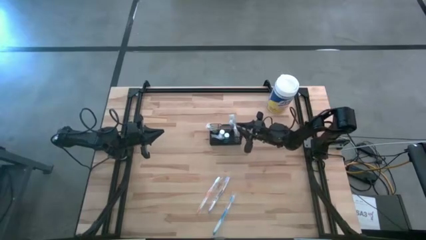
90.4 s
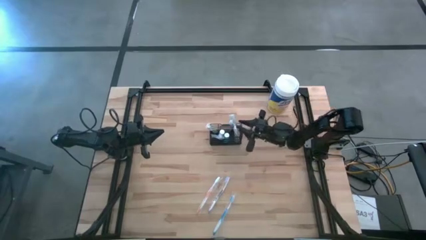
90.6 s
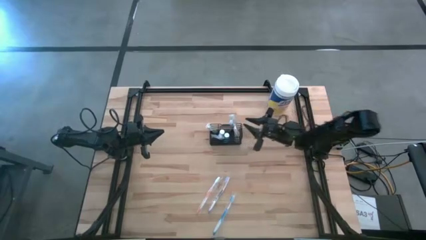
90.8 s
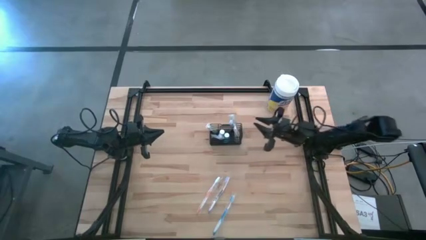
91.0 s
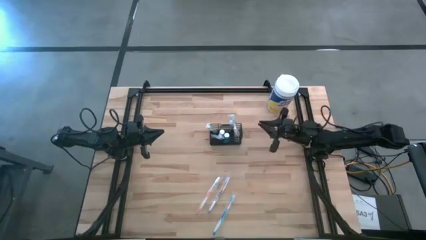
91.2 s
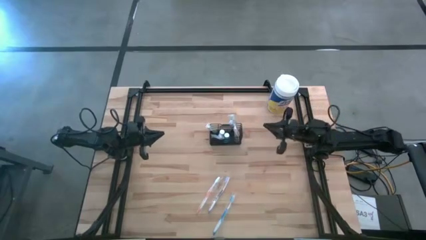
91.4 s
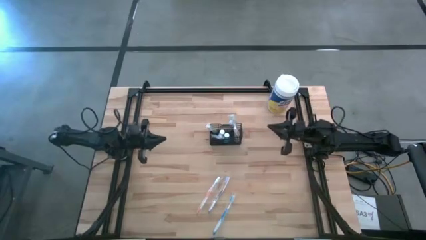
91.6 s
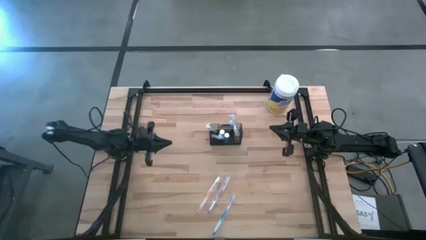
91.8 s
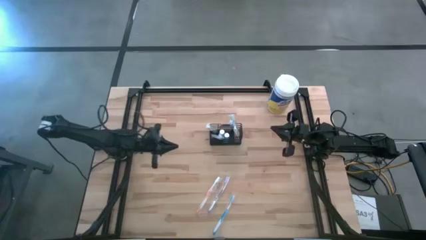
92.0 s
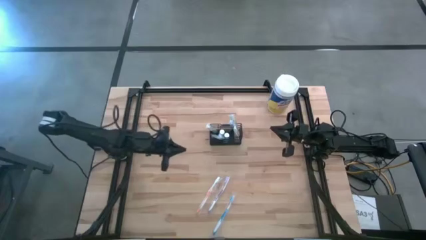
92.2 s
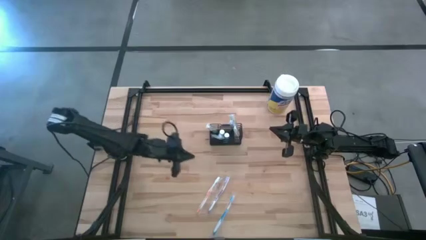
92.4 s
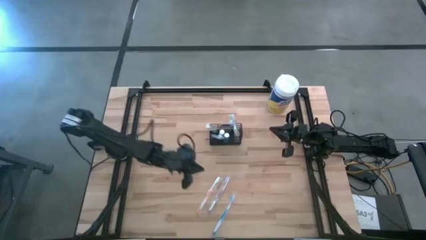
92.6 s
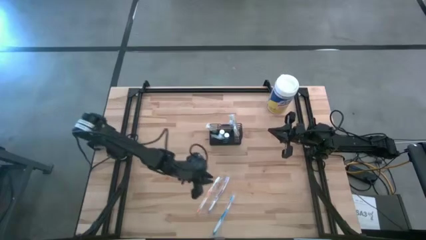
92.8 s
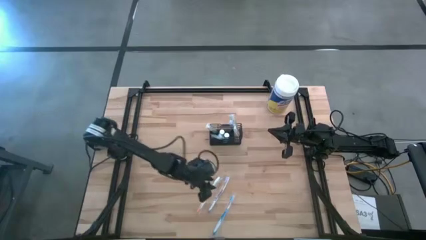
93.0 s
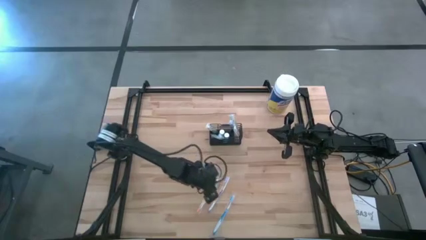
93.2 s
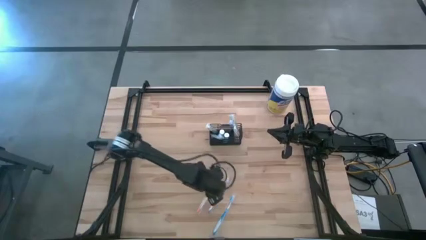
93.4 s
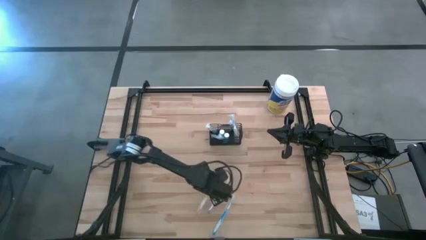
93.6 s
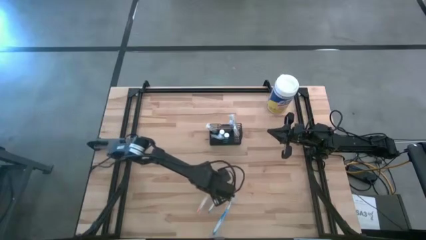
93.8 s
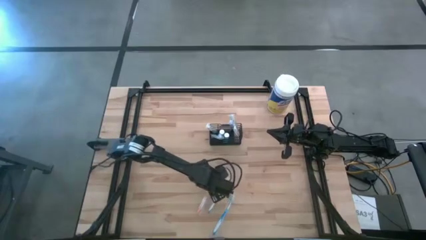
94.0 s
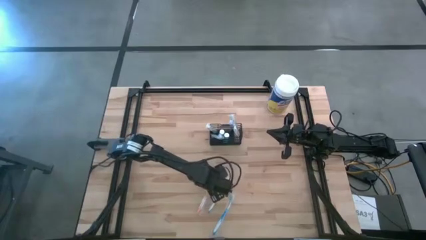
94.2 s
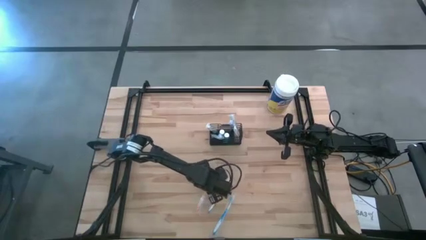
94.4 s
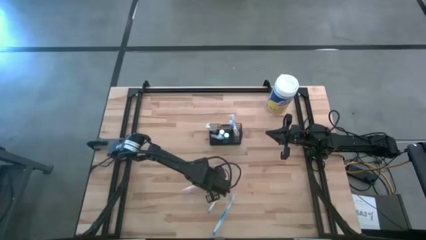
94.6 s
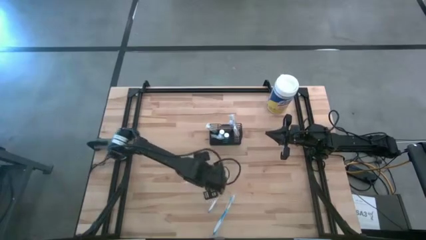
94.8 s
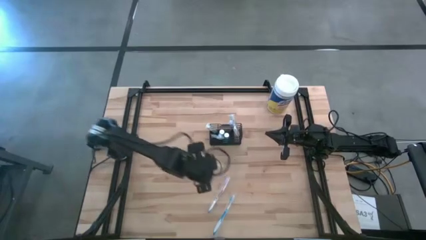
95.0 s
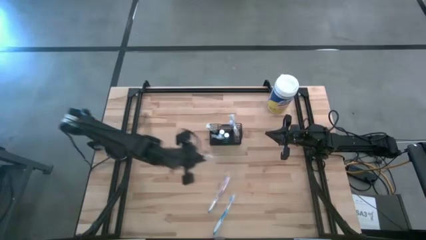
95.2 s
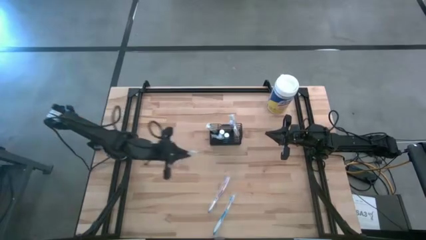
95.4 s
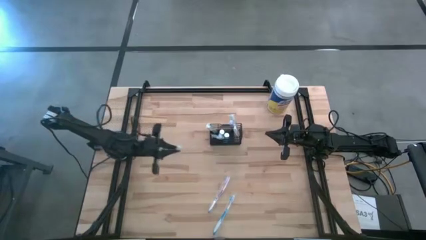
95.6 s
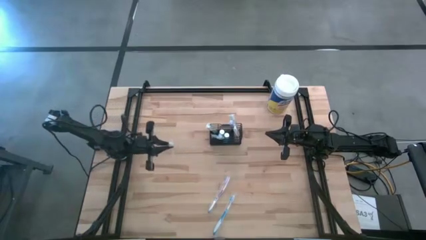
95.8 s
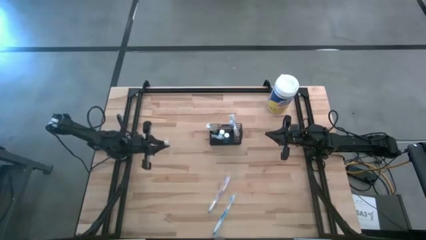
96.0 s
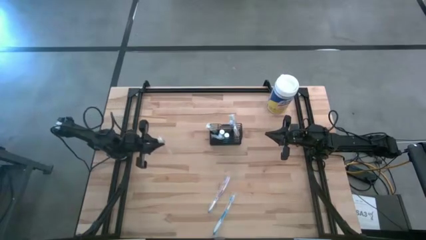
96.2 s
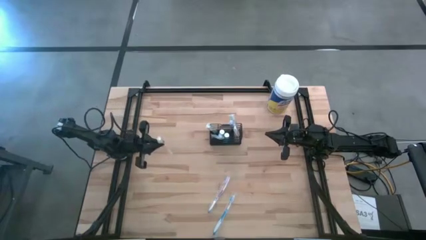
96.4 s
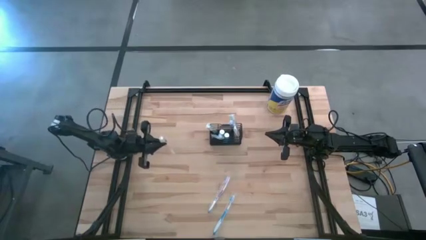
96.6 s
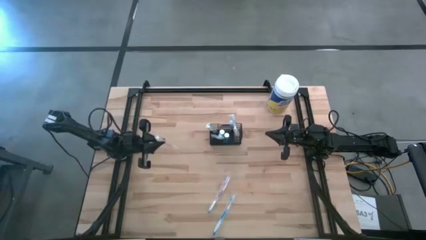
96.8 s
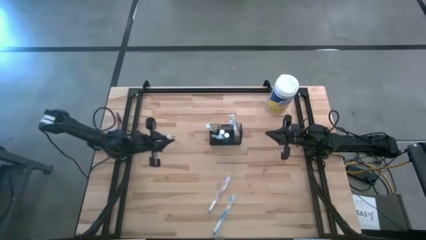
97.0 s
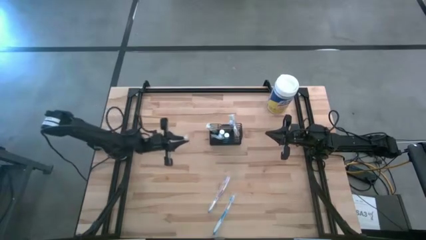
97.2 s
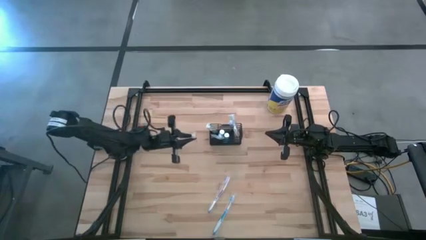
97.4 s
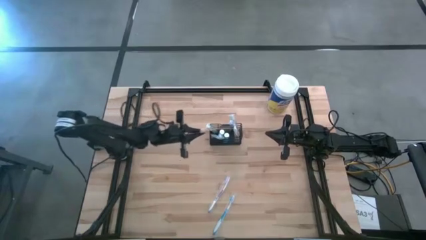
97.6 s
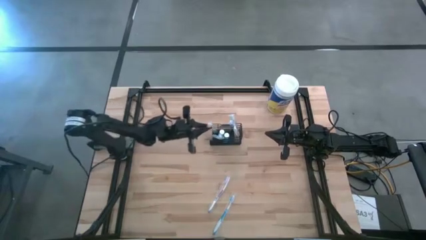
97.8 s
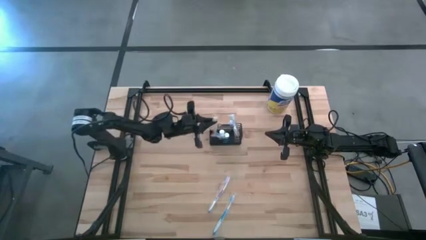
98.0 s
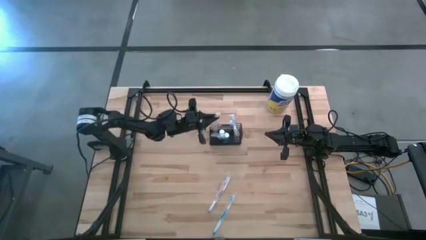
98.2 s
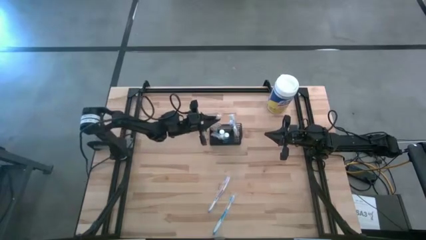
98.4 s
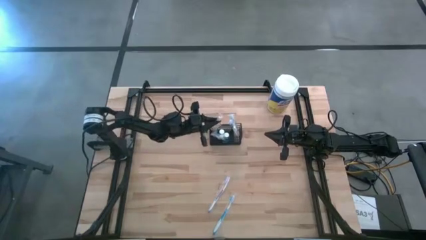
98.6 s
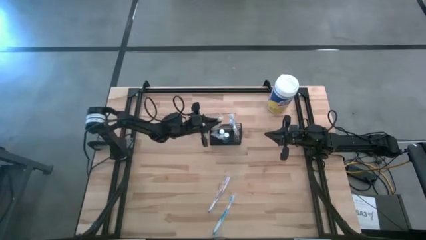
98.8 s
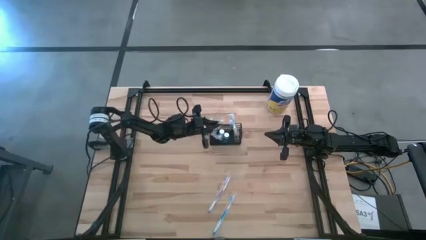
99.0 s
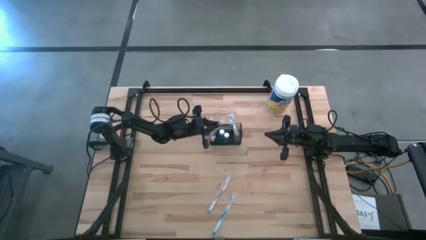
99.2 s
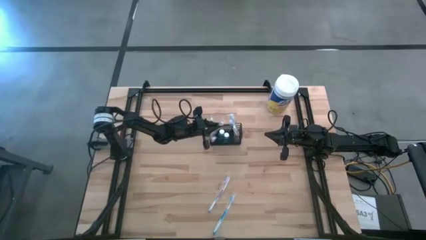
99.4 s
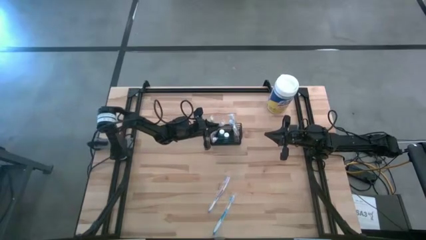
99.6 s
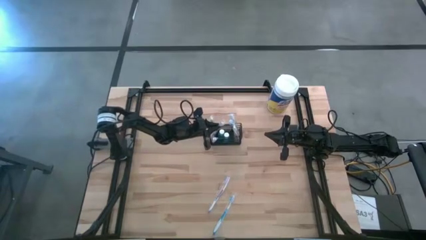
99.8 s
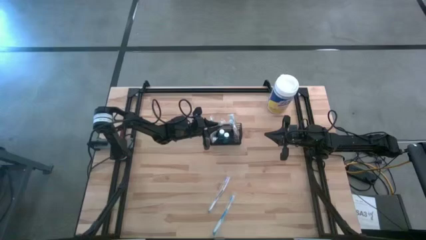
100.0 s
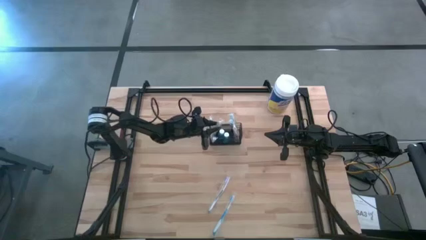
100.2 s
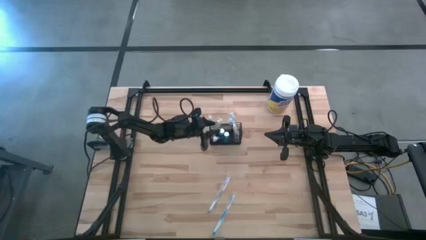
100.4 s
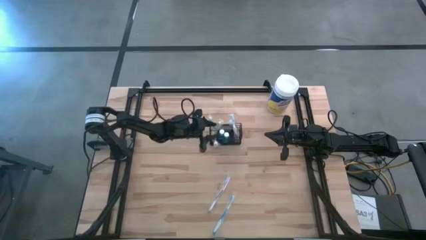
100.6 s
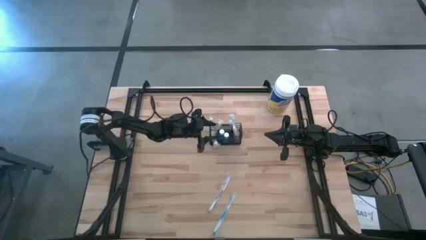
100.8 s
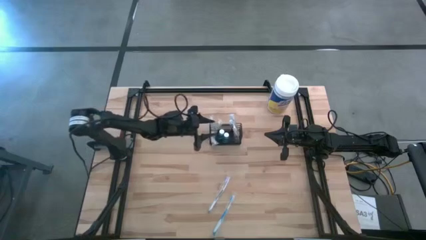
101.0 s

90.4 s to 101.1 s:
Task: Pick & Place toothbrushing station
Put the orange toothbrush into the black wire organizer
